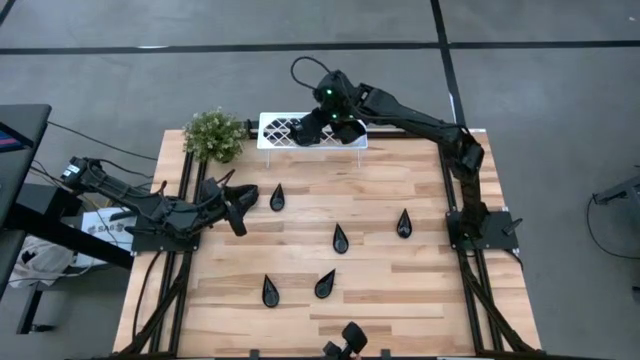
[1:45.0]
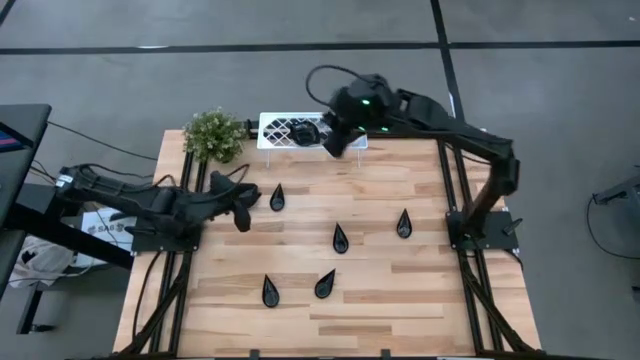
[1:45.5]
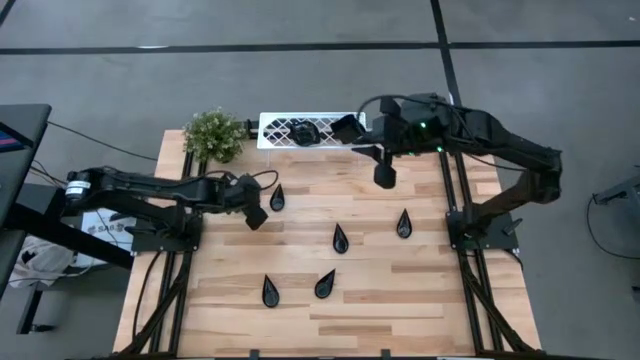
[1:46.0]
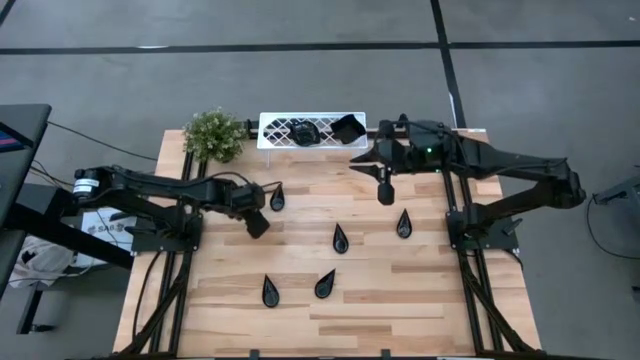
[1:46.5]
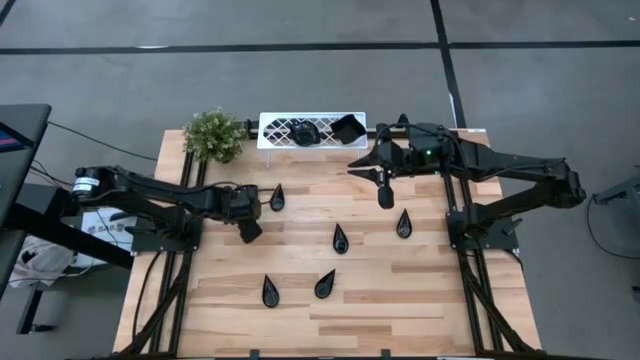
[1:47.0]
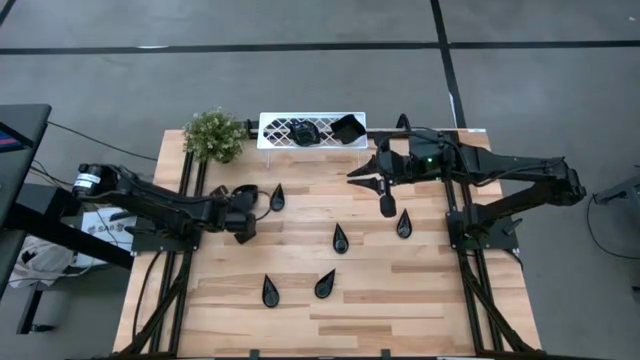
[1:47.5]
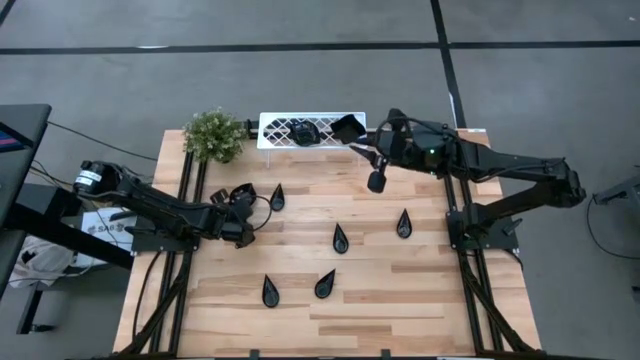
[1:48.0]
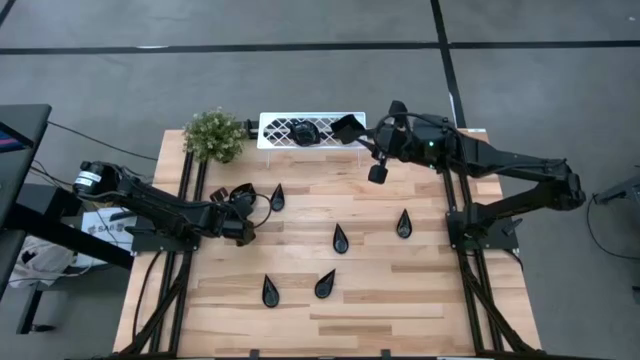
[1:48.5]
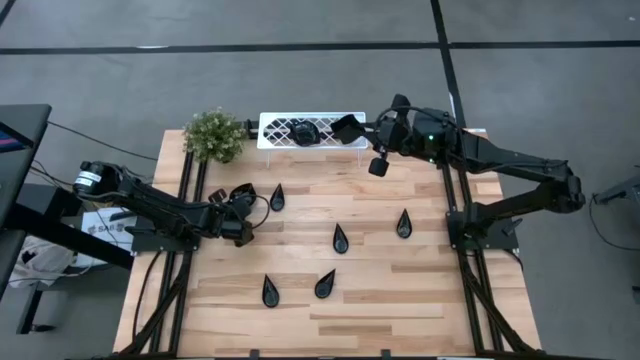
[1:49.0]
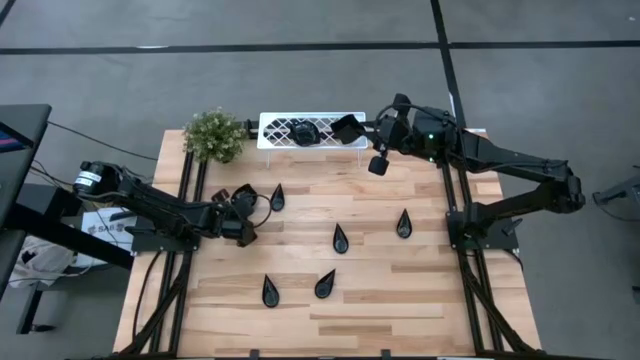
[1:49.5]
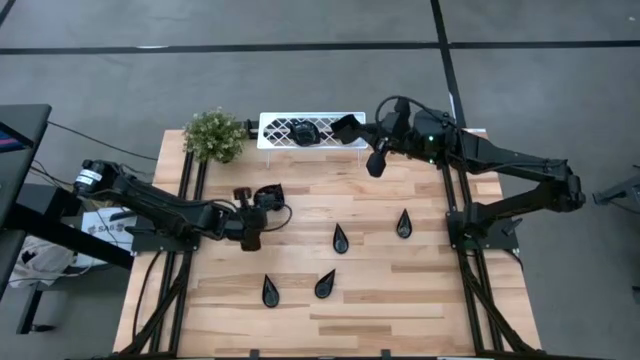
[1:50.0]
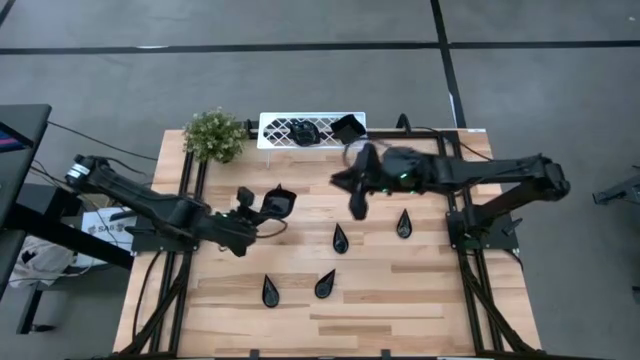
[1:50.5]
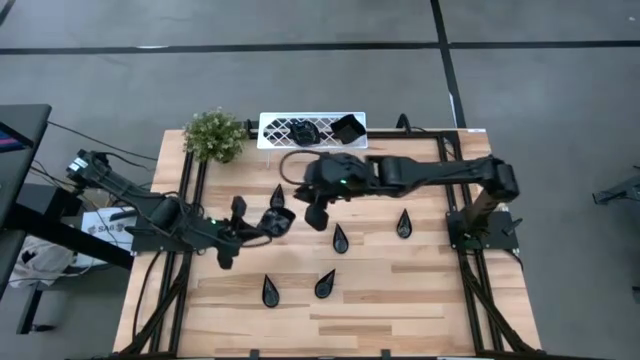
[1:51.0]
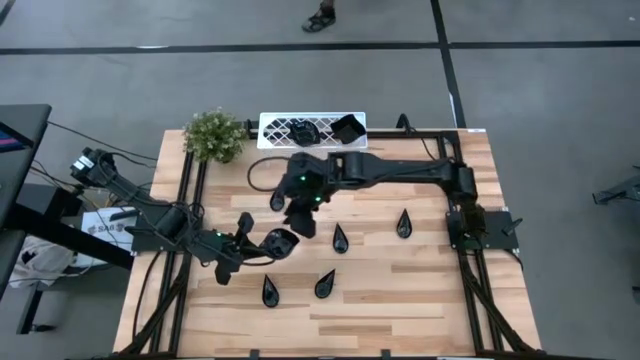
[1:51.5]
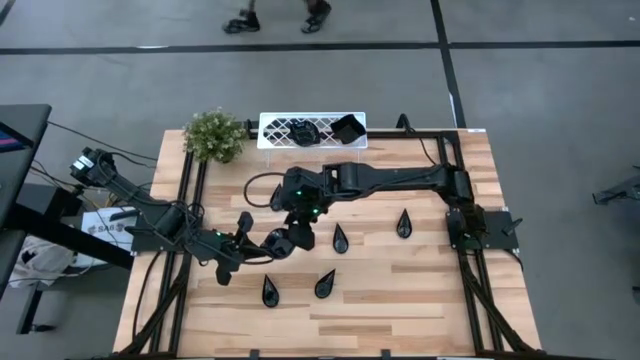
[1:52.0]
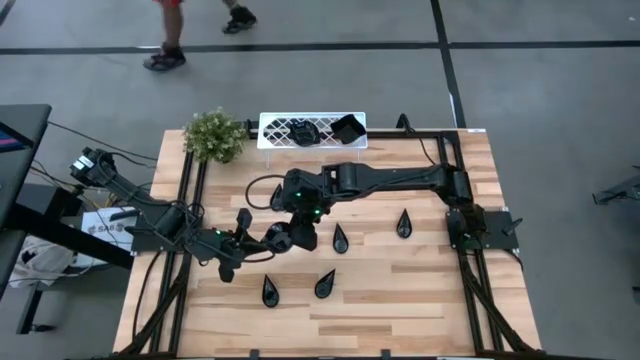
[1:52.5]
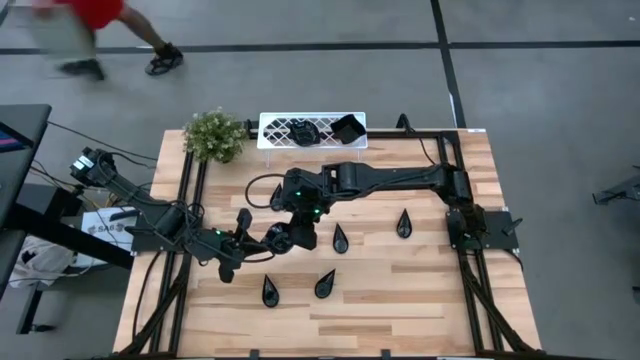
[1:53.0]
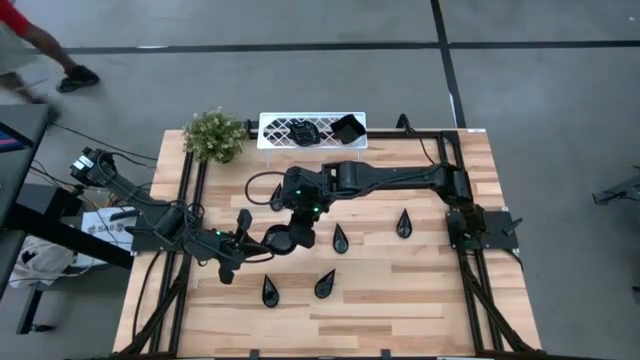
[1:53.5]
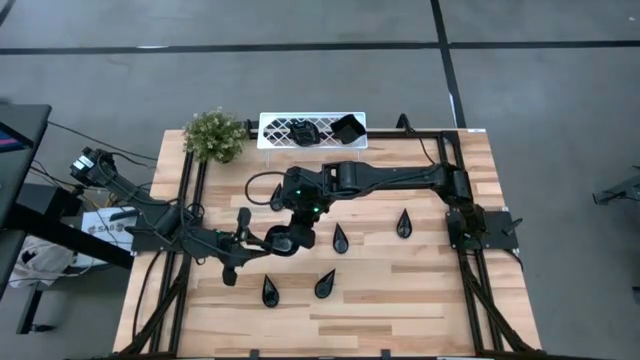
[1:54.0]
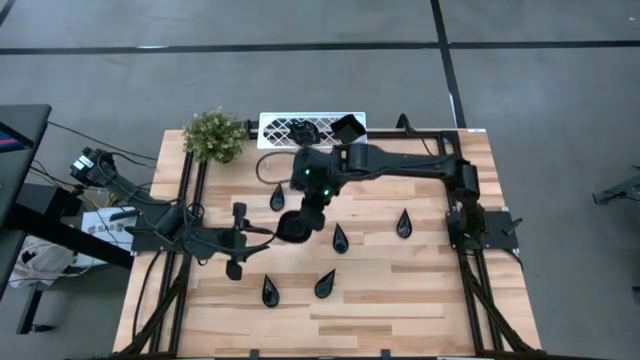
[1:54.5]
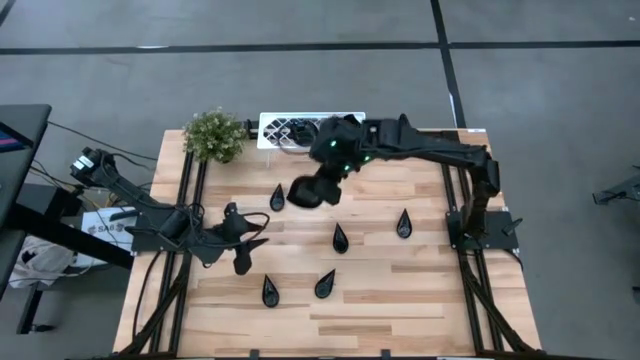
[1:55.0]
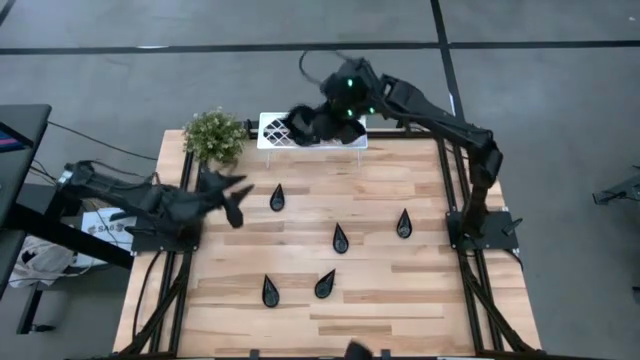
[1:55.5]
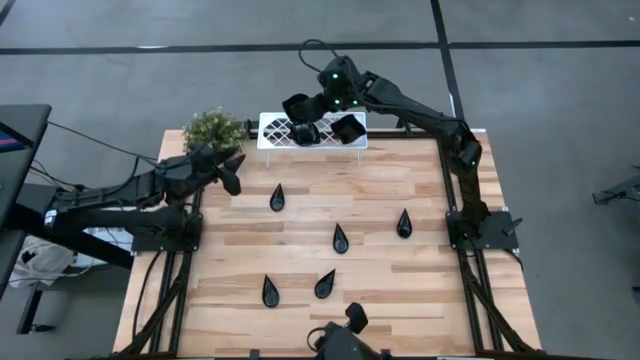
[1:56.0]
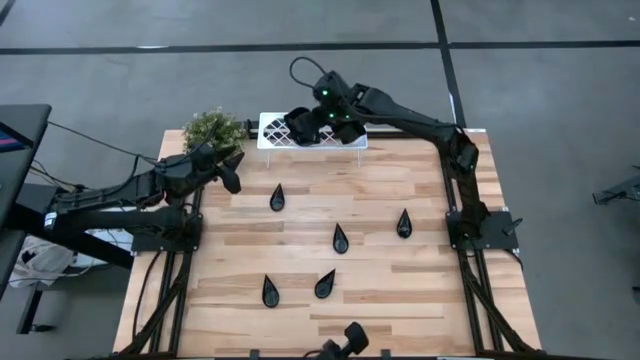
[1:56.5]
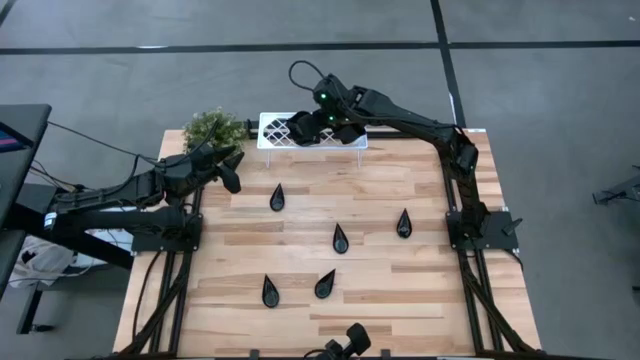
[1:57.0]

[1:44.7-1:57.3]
Task: Pick & Place Mini shaped plates
Stack the leaf shaped plate on the top of the leaf shaped plates on the shelf

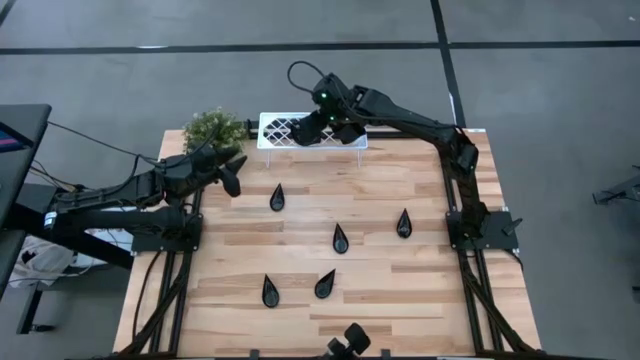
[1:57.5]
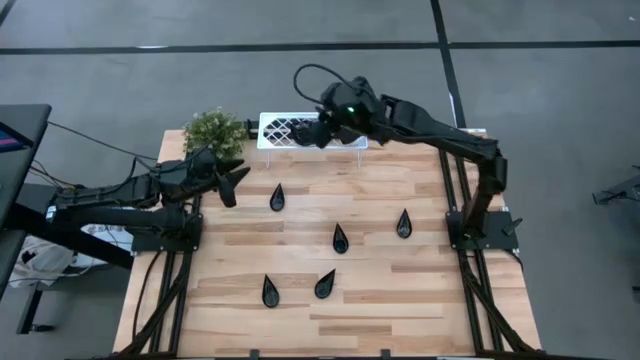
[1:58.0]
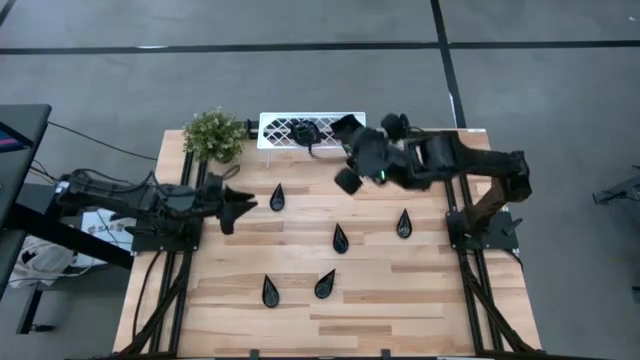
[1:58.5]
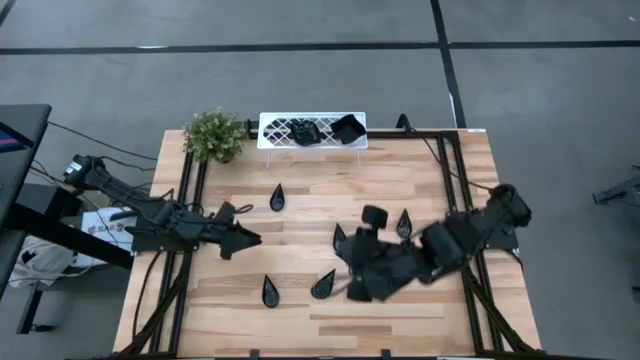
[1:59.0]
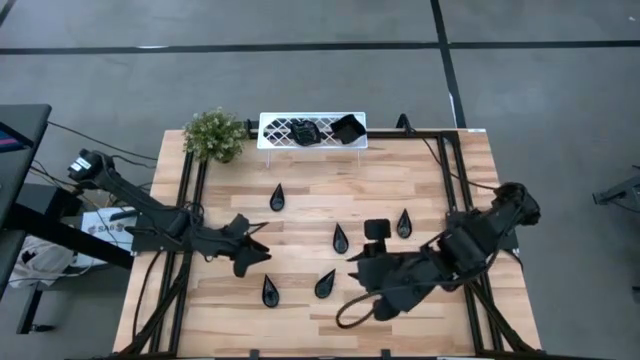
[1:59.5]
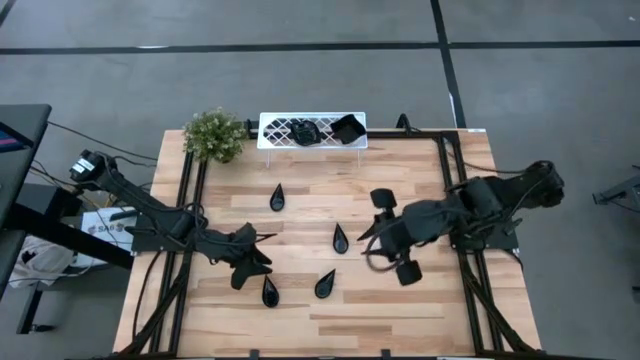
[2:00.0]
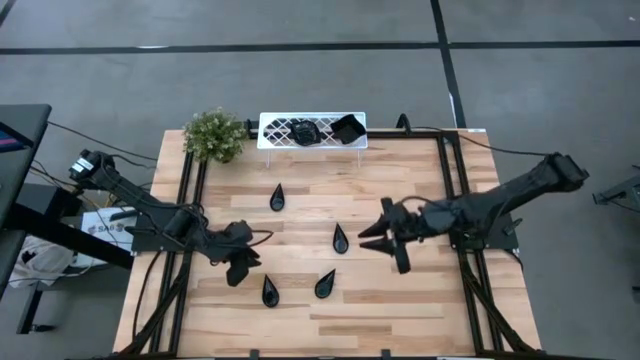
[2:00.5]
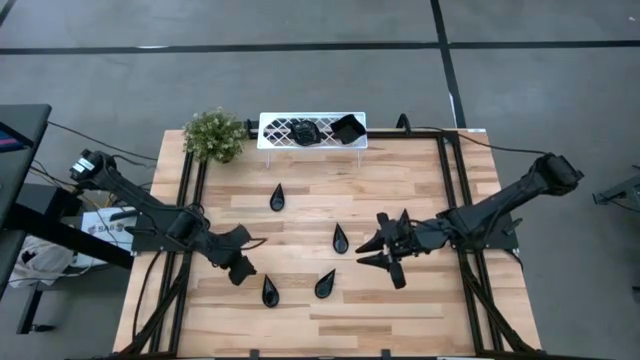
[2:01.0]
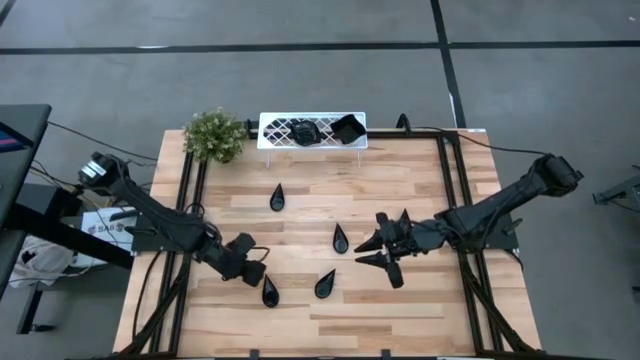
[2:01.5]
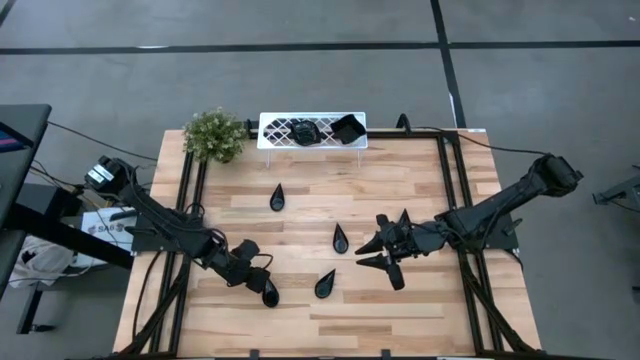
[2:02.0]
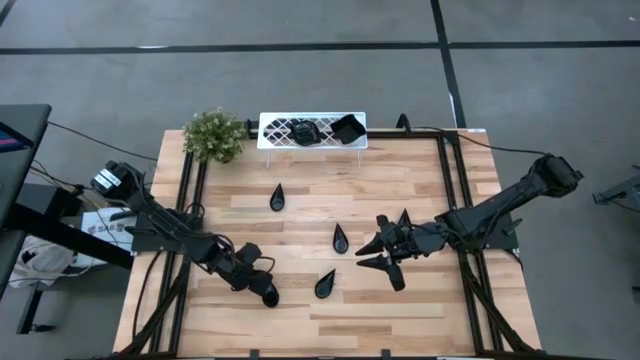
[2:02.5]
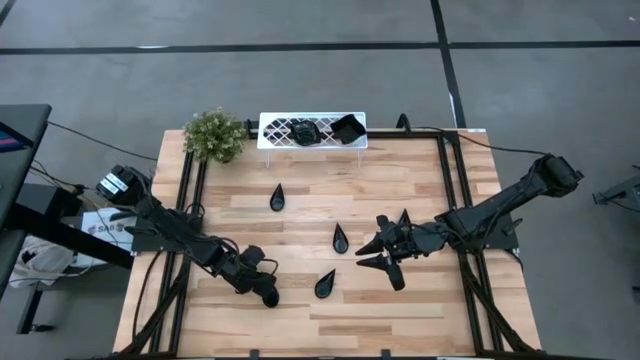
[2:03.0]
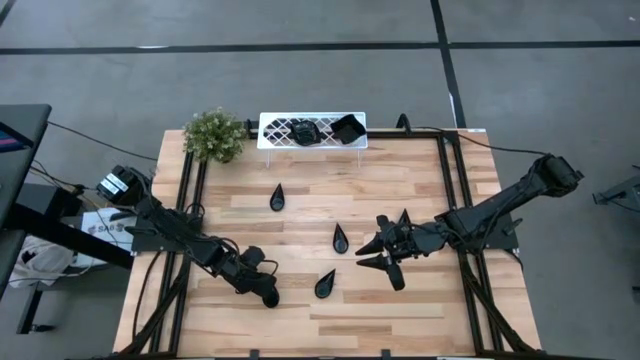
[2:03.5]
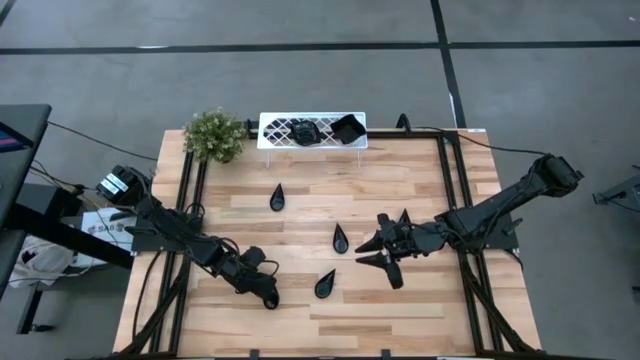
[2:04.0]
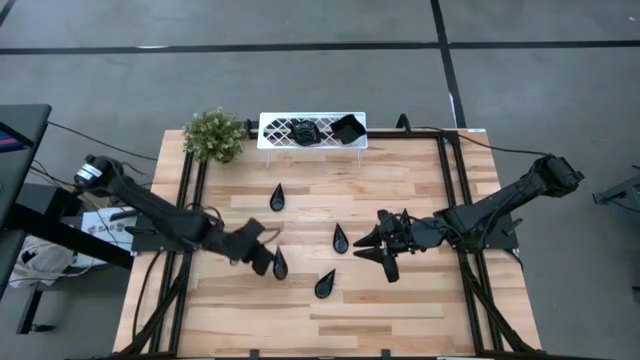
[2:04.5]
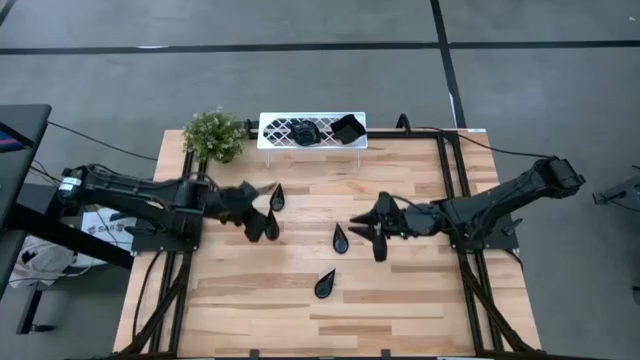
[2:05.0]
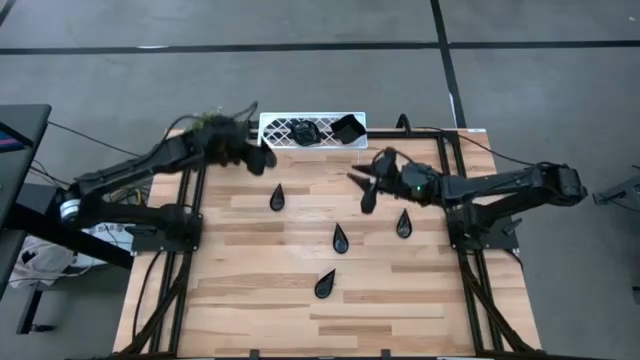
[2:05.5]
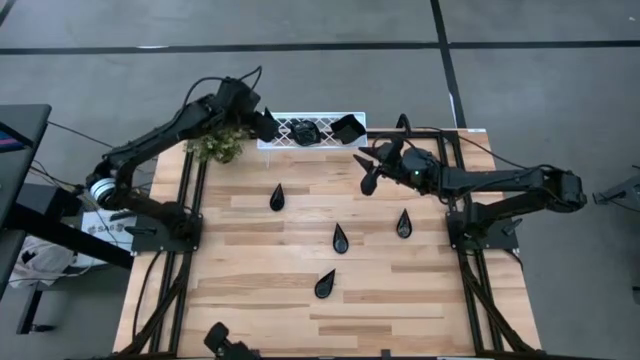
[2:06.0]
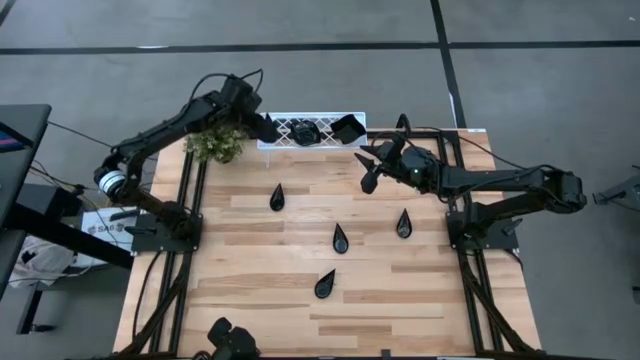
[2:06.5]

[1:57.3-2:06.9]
Put the drop shaped plate on the shelf
